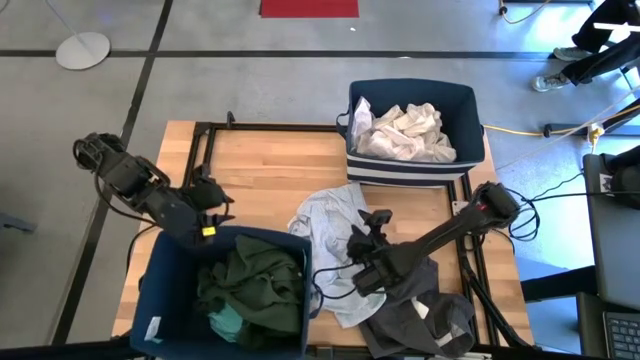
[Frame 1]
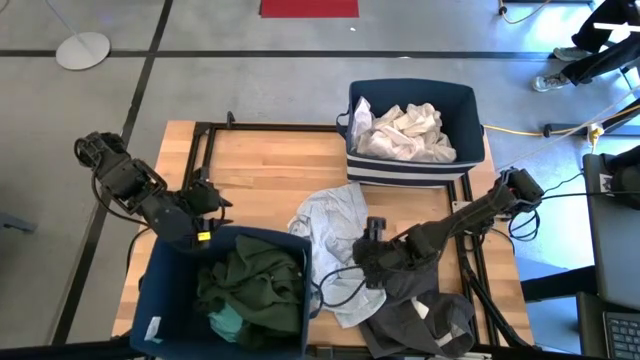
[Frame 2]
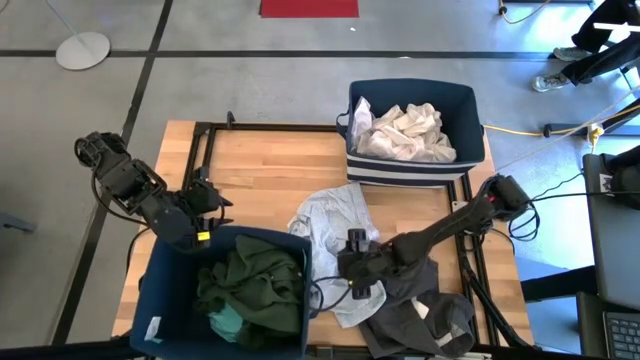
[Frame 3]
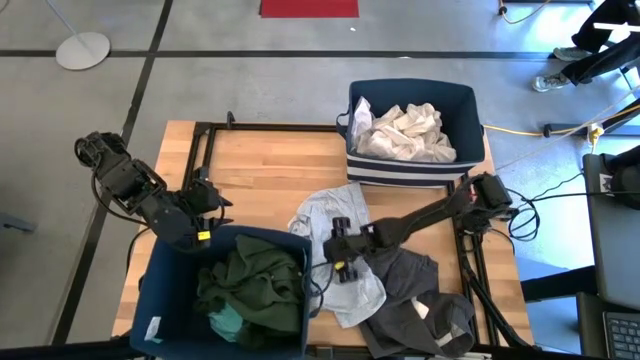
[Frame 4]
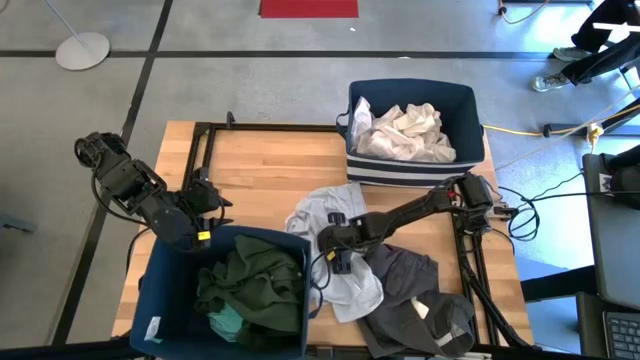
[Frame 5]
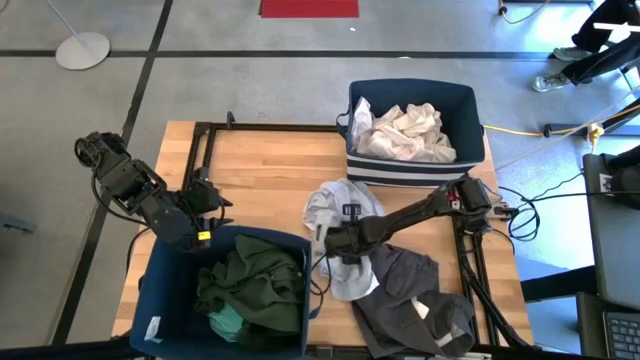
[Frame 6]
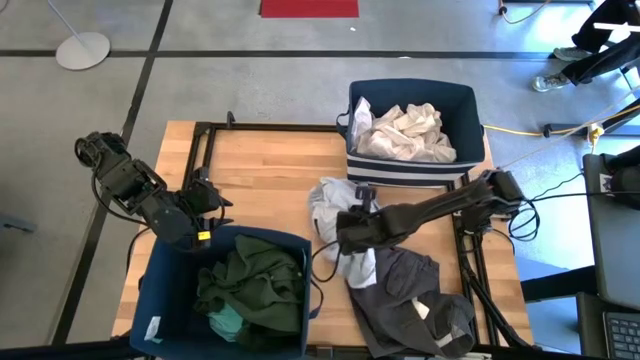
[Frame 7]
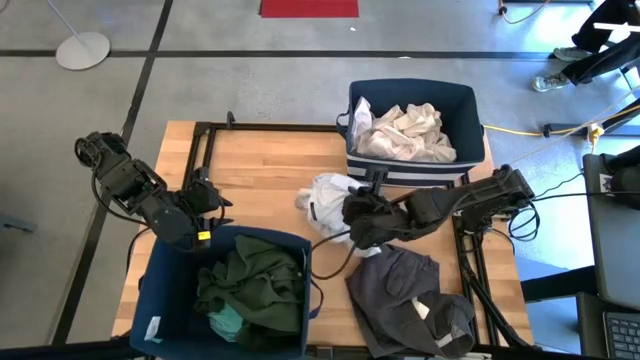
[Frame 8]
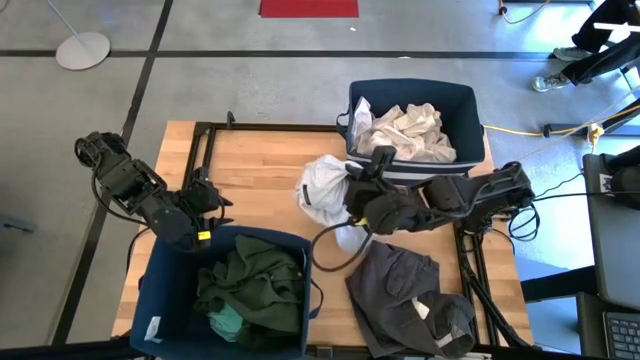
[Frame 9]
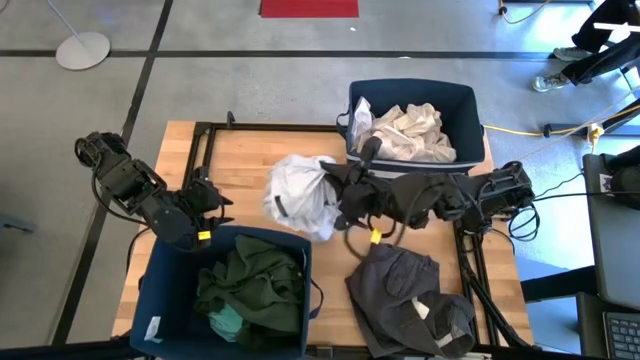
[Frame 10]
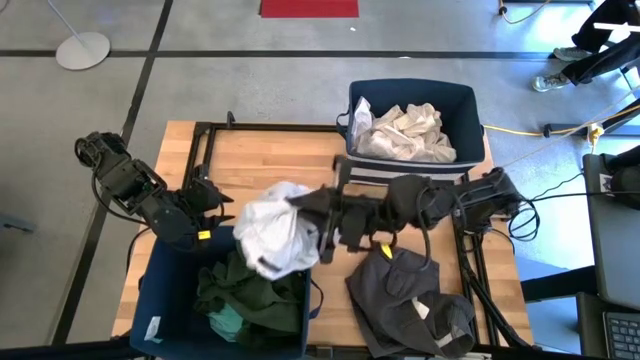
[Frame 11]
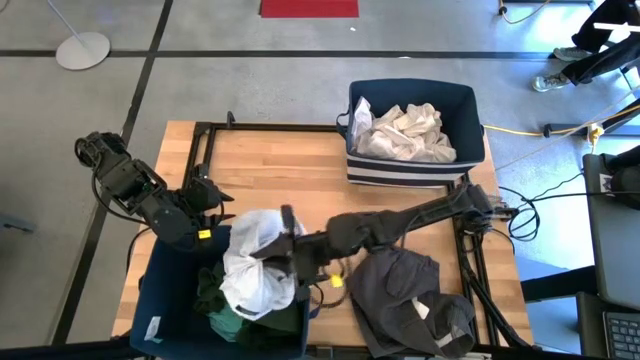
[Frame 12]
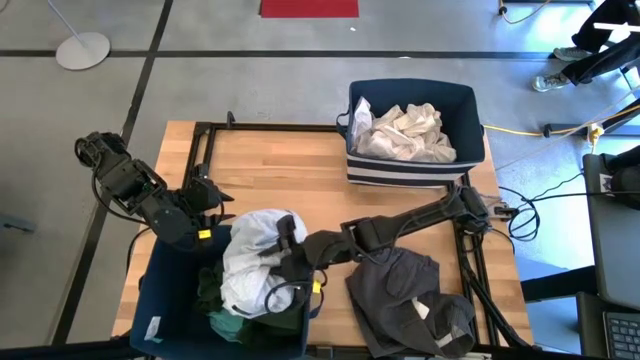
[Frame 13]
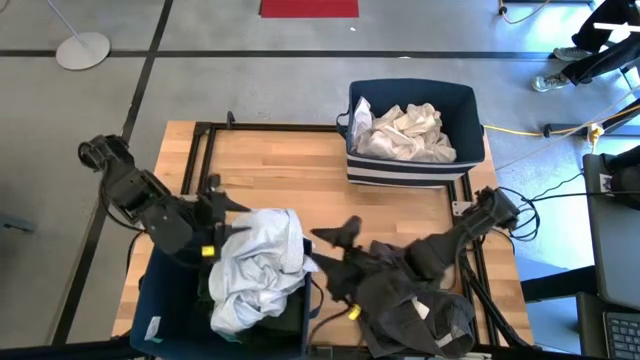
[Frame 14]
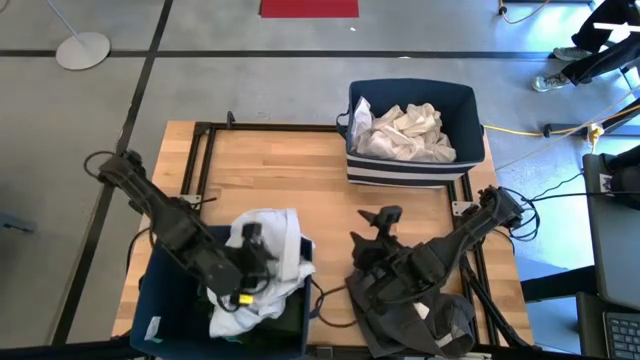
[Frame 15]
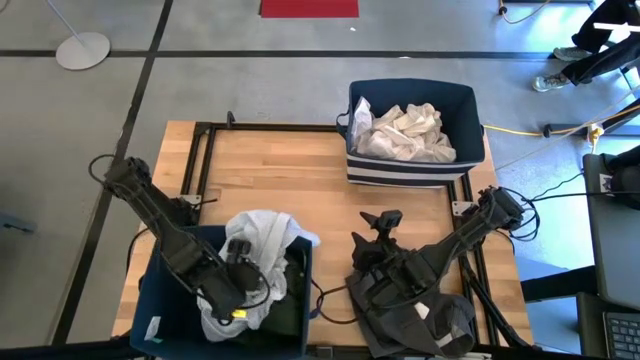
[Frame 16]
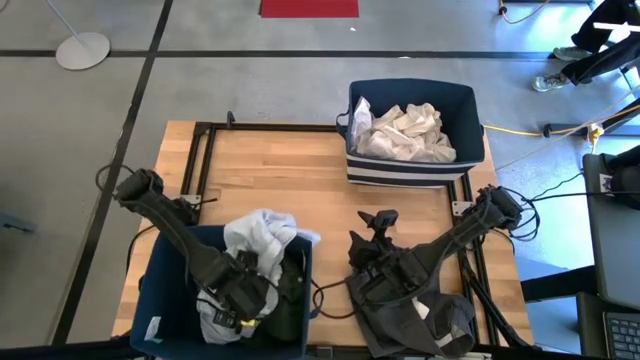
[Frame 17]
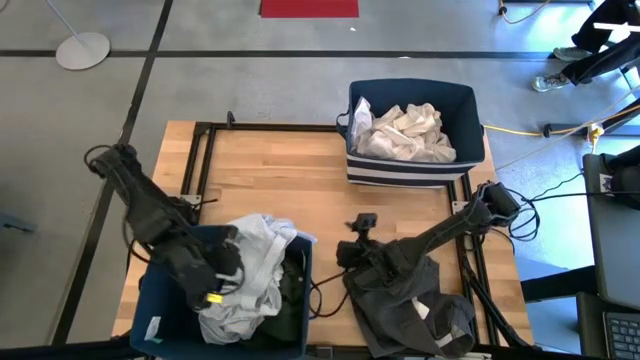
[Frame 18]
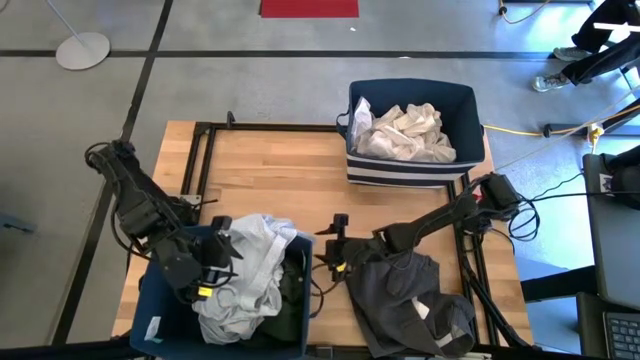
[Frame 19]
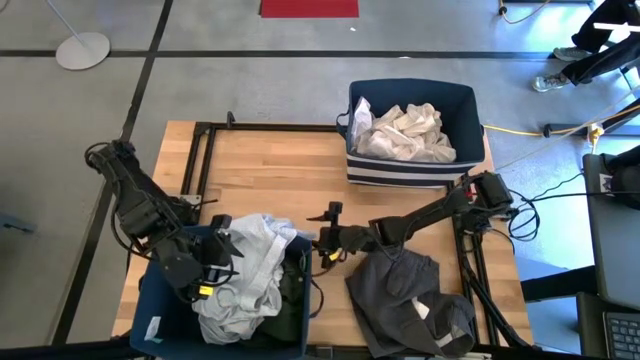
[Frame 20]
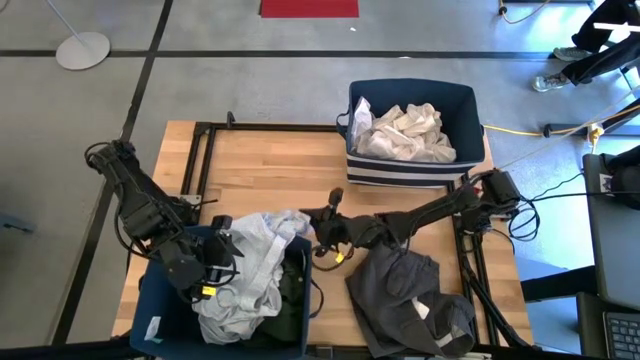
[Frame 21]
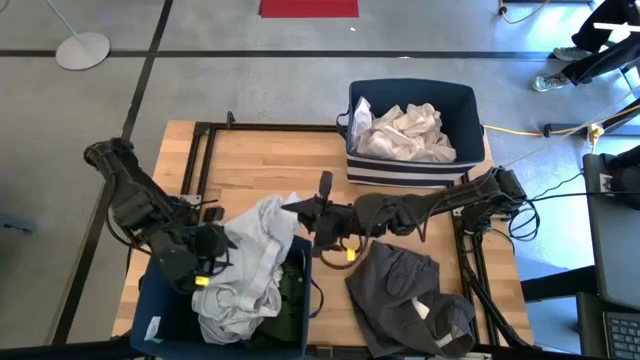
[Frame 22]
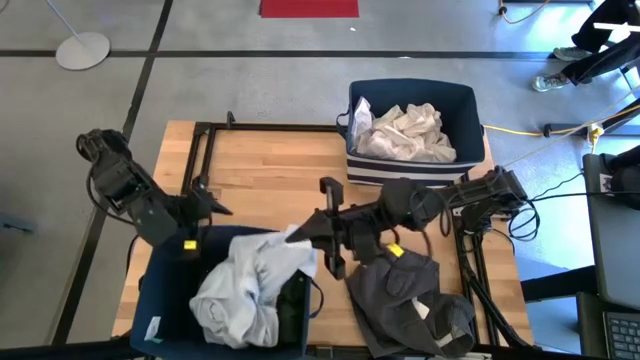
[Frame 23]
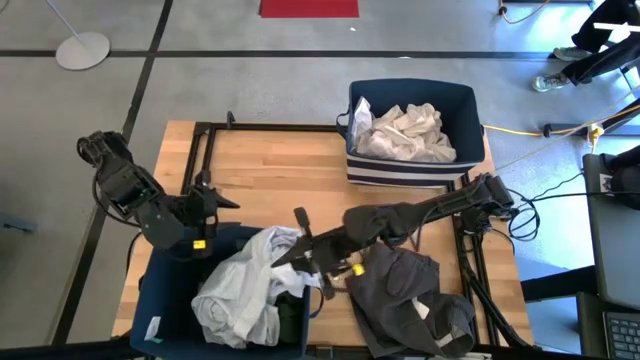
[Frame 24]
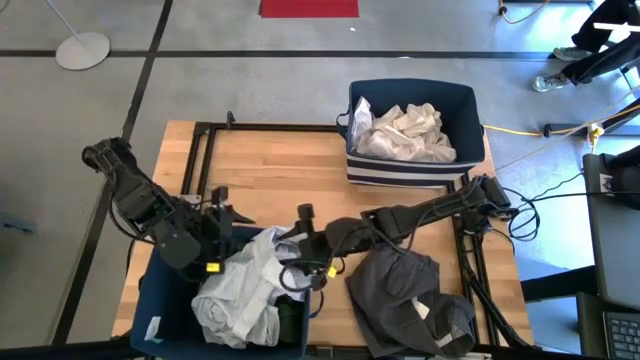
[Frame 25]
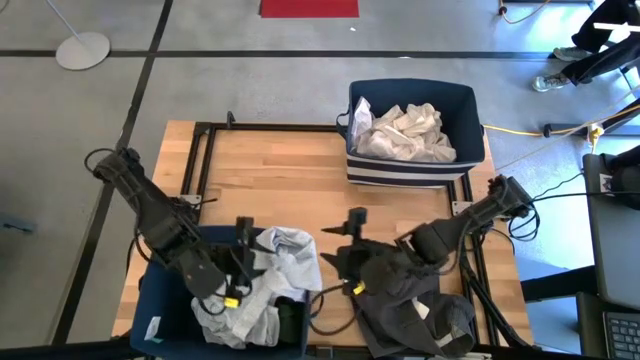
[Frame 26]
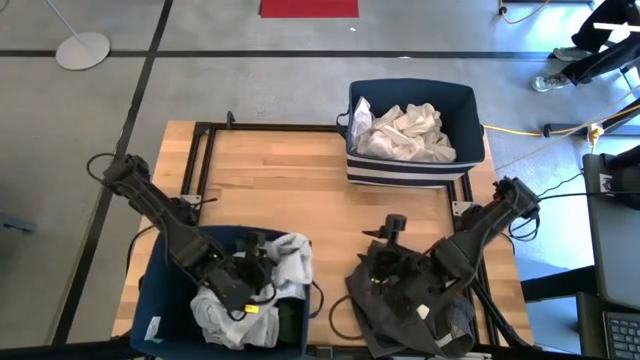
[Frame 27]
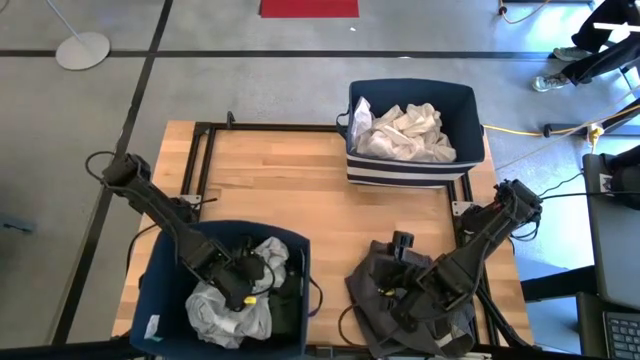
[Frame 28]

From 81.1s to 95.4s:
Task: Sort clothes
Put the blue patterned polo shirt into the bottom laundry bin

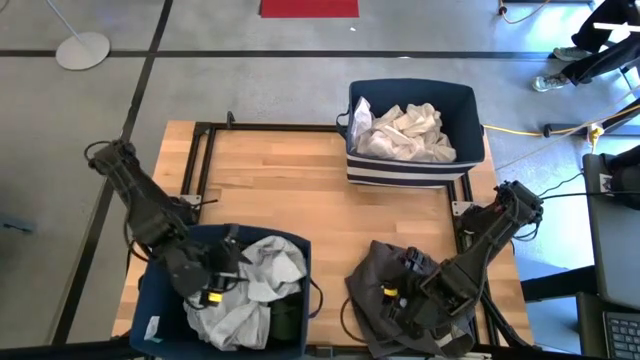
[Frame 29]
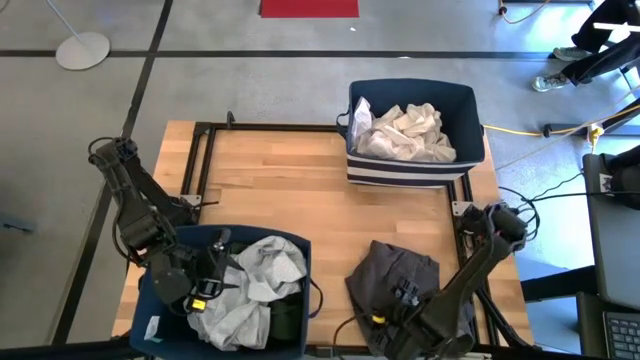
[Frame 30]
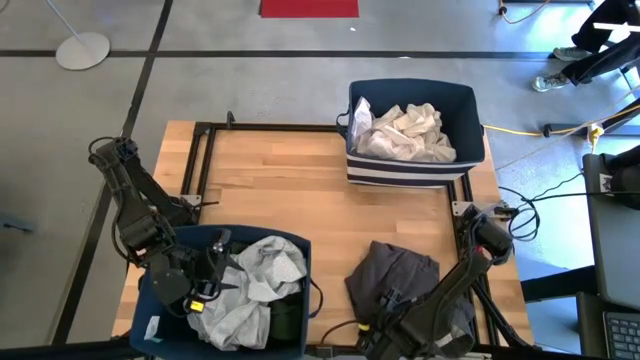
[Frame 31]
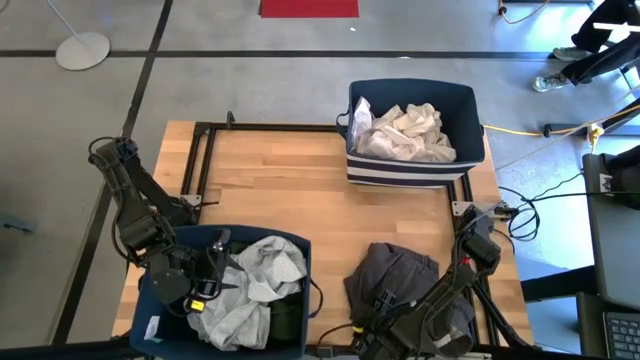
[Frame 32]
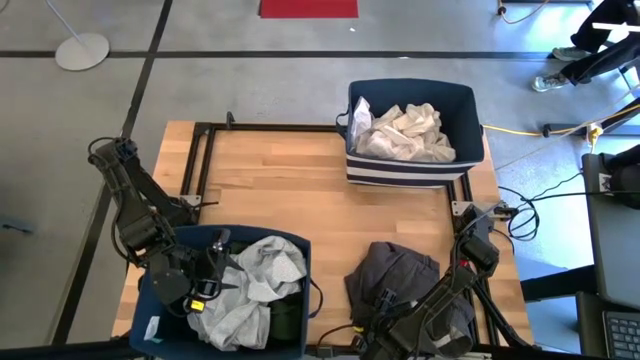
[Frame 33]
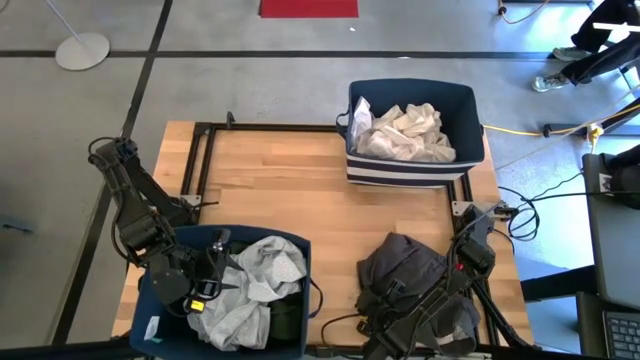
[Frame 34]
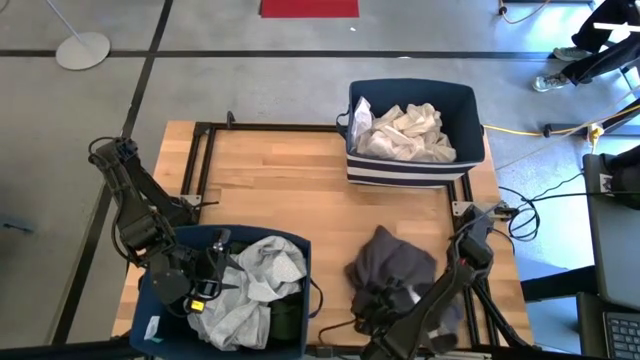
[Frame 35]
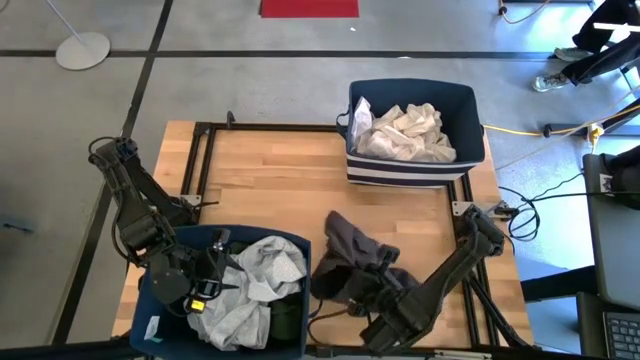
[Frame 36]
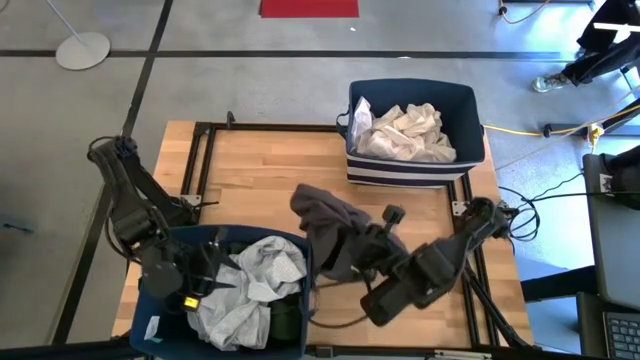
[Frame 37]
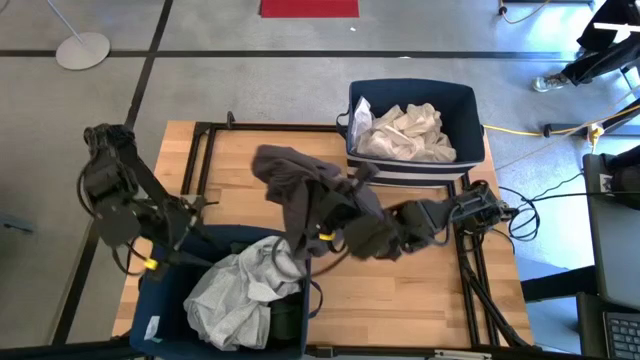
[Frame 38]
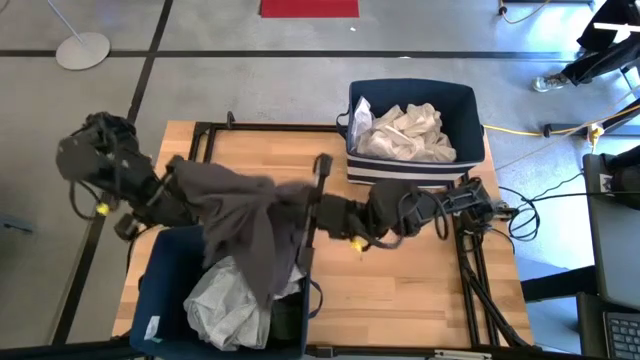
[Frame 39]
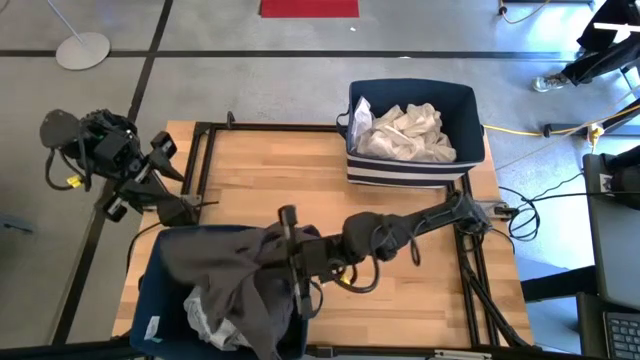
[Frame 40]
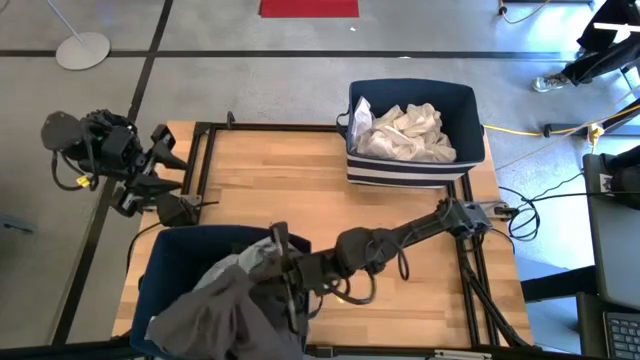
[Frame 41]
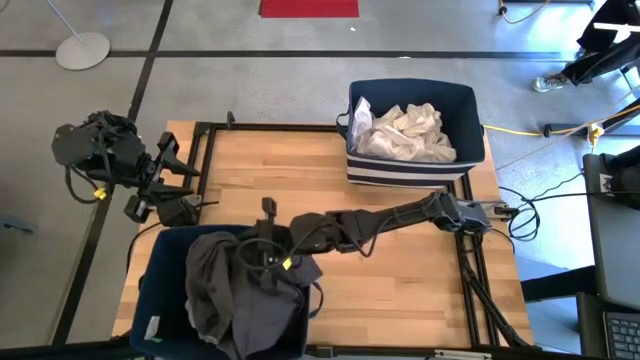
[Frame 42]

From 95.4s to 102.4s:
Put the black pants into the bottom laundry bin
